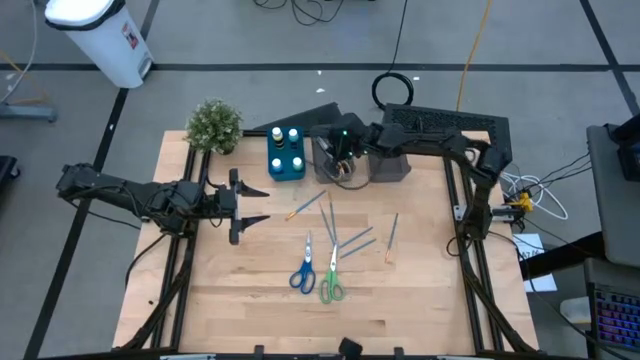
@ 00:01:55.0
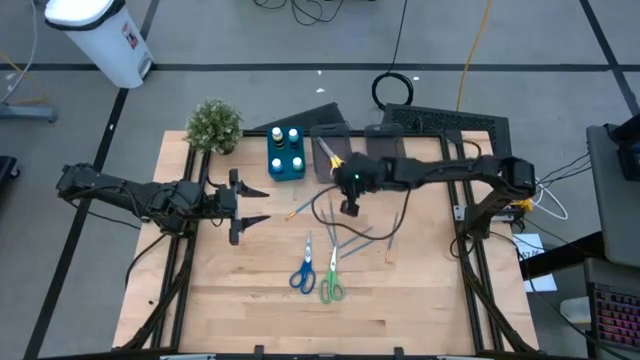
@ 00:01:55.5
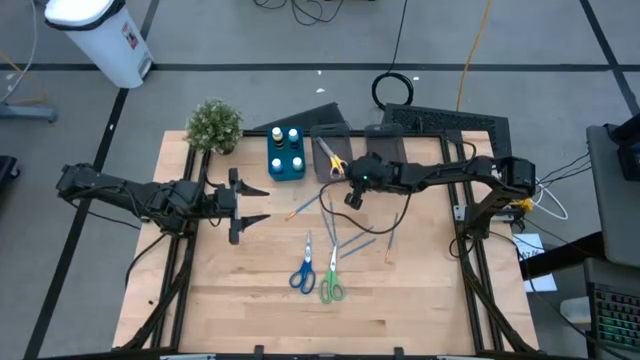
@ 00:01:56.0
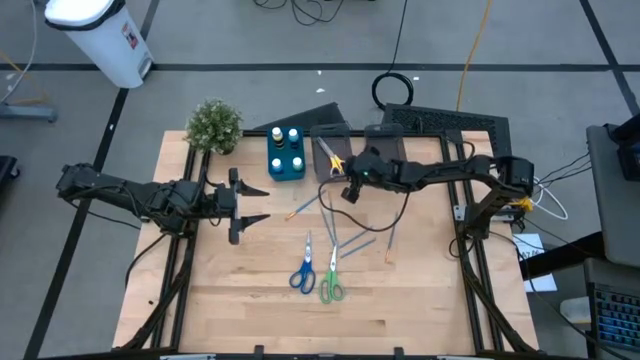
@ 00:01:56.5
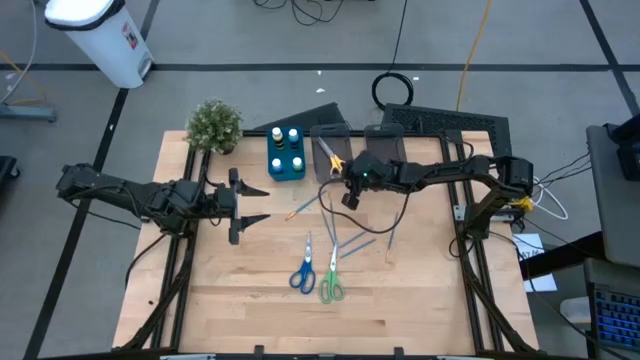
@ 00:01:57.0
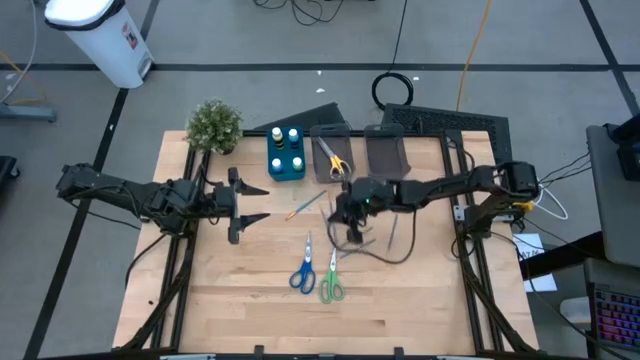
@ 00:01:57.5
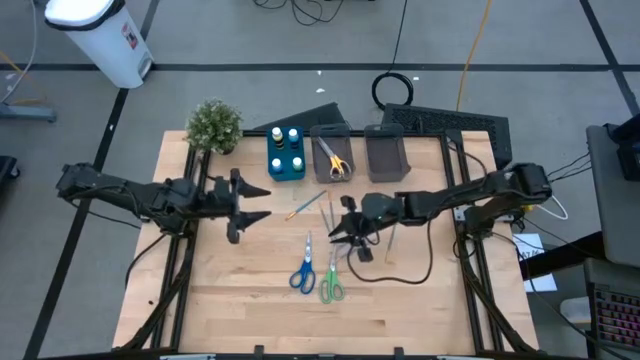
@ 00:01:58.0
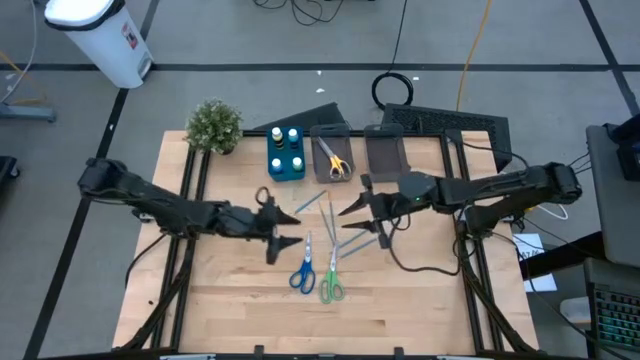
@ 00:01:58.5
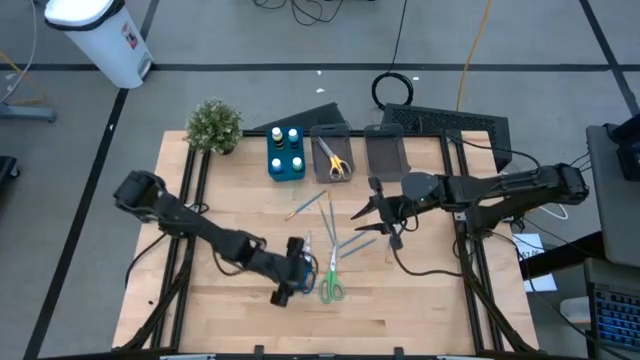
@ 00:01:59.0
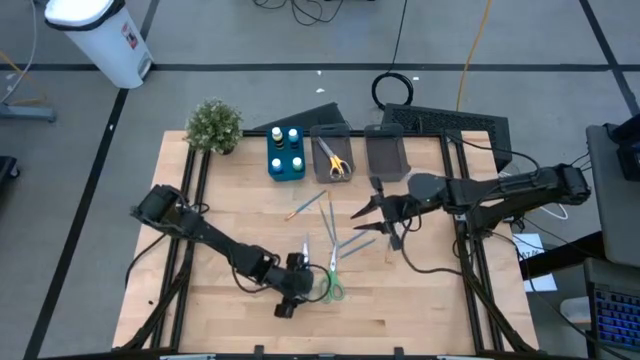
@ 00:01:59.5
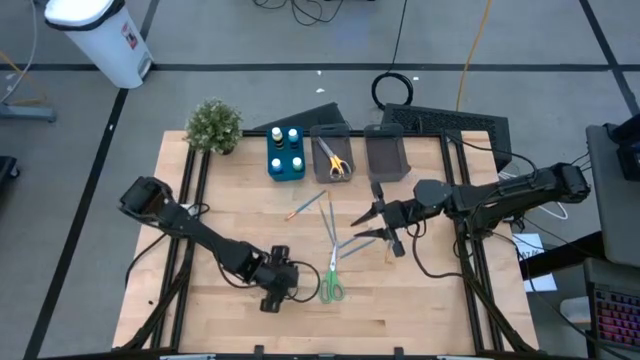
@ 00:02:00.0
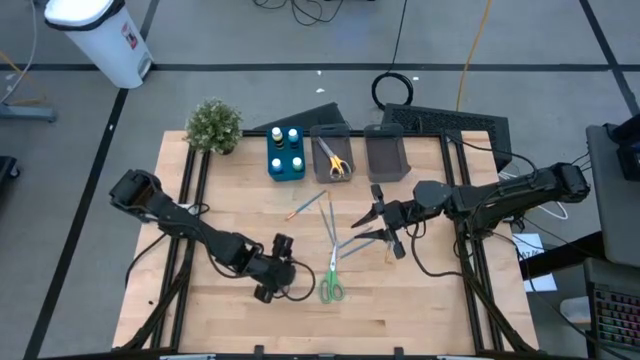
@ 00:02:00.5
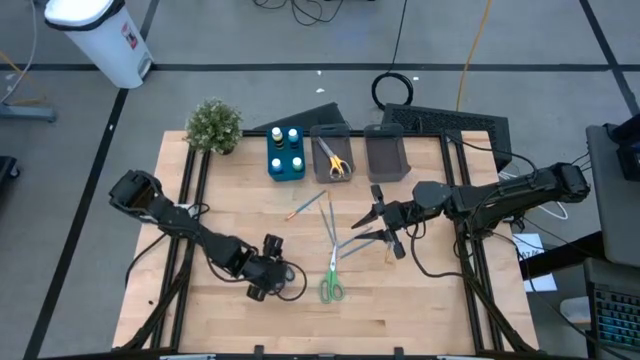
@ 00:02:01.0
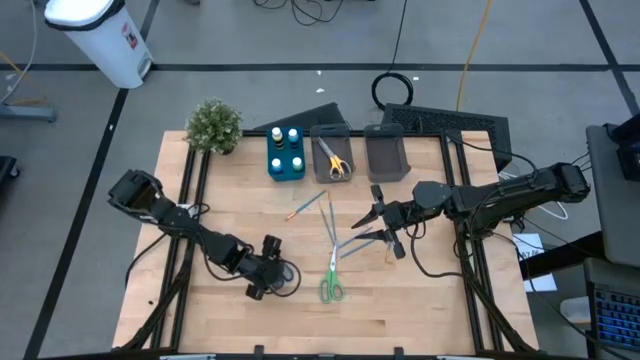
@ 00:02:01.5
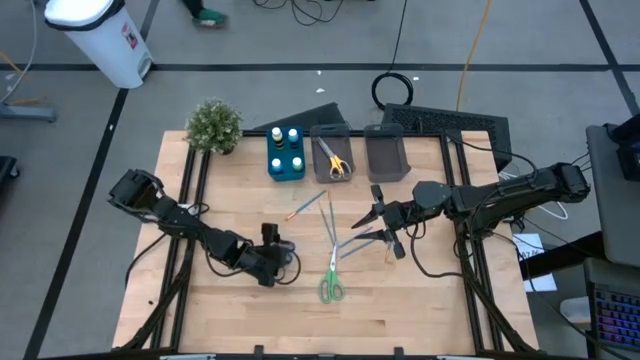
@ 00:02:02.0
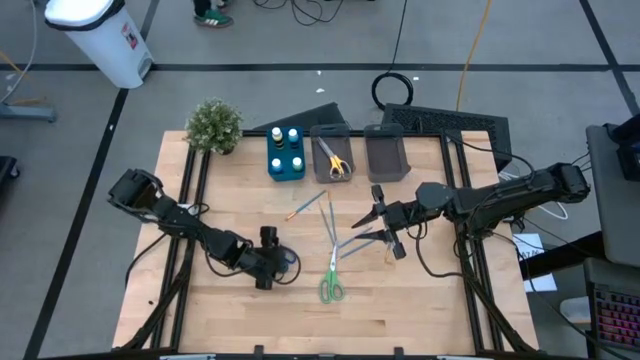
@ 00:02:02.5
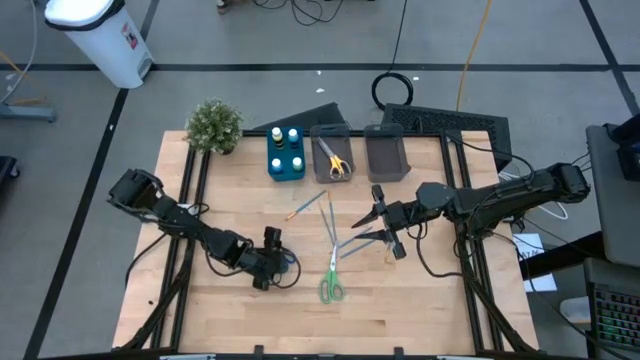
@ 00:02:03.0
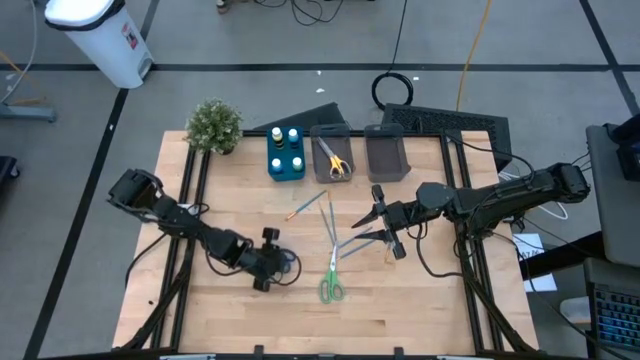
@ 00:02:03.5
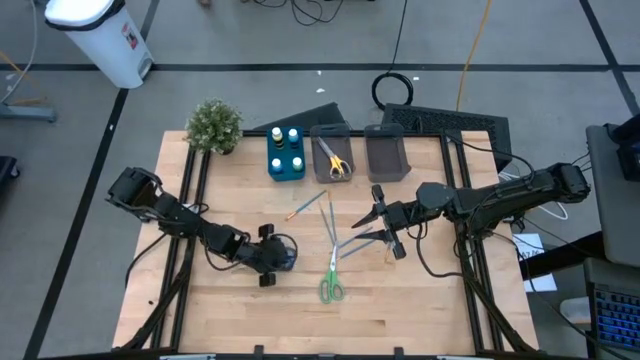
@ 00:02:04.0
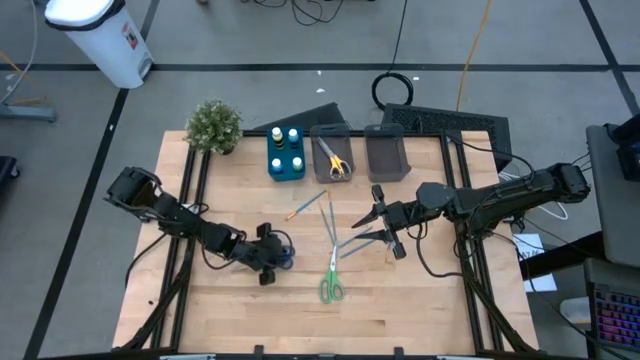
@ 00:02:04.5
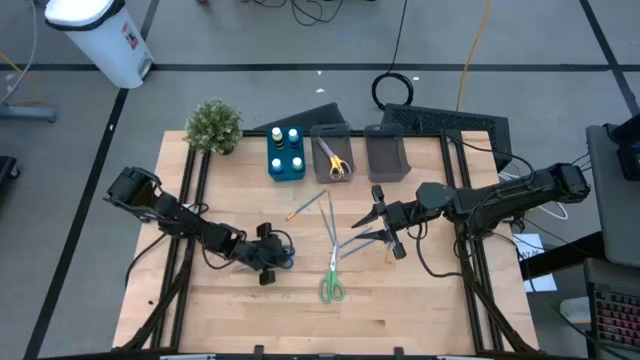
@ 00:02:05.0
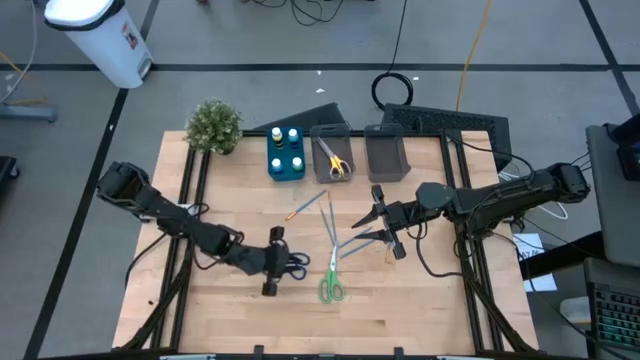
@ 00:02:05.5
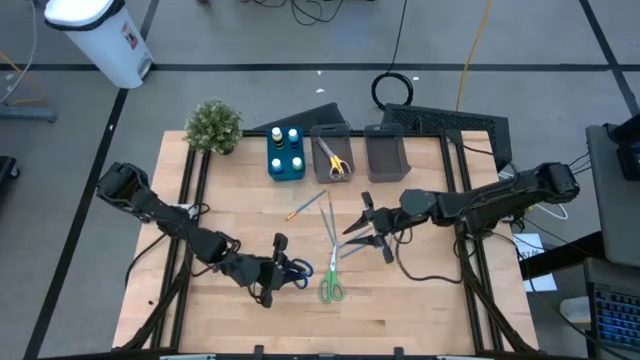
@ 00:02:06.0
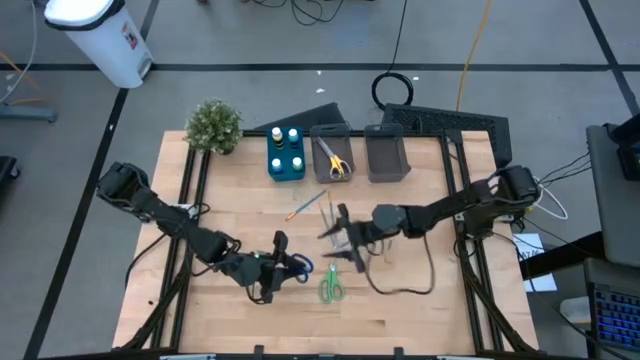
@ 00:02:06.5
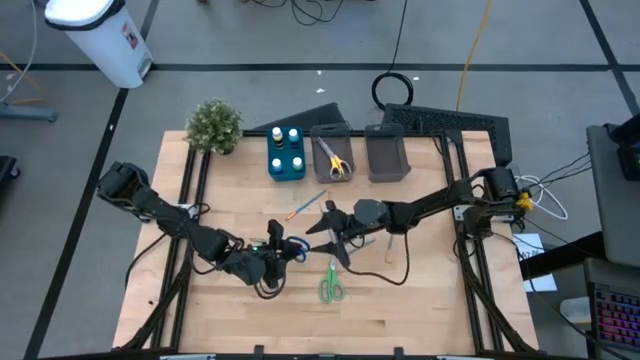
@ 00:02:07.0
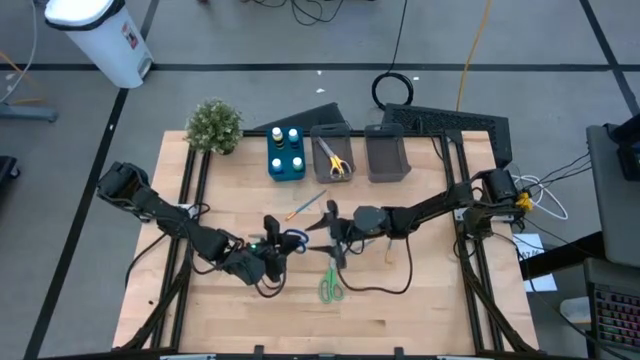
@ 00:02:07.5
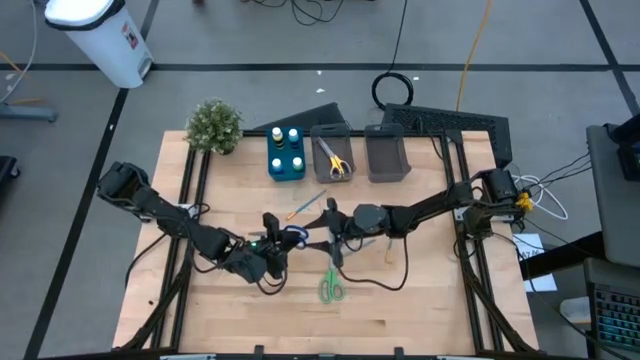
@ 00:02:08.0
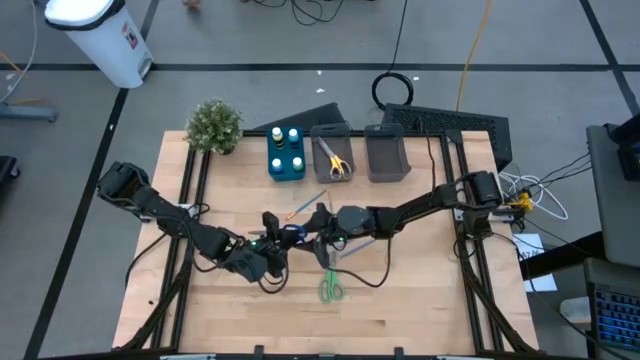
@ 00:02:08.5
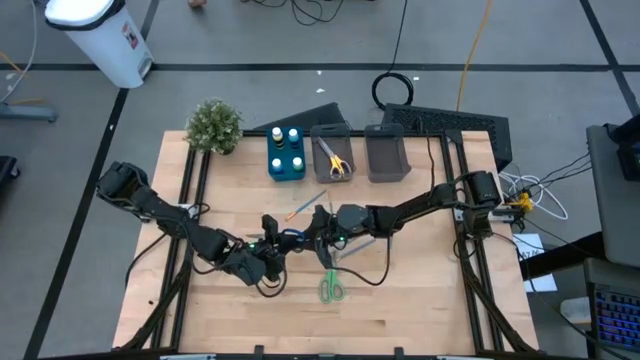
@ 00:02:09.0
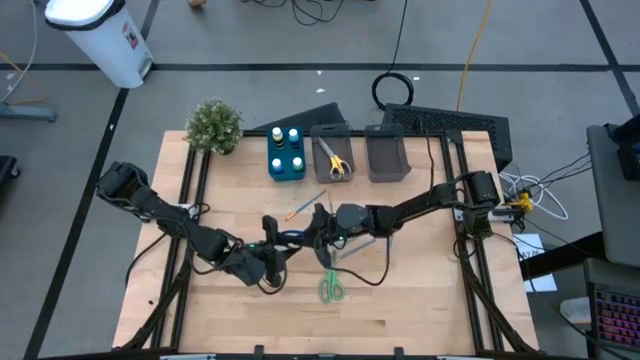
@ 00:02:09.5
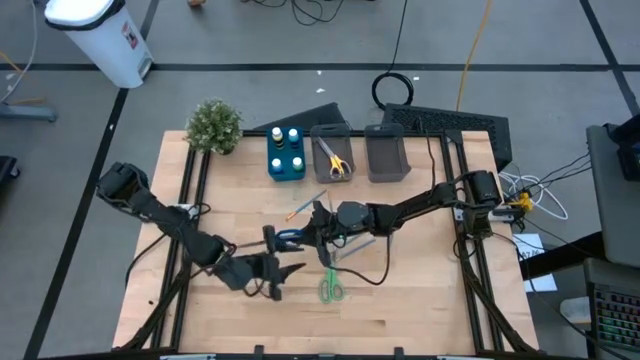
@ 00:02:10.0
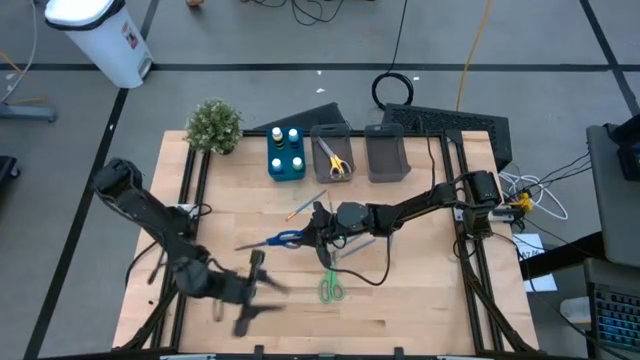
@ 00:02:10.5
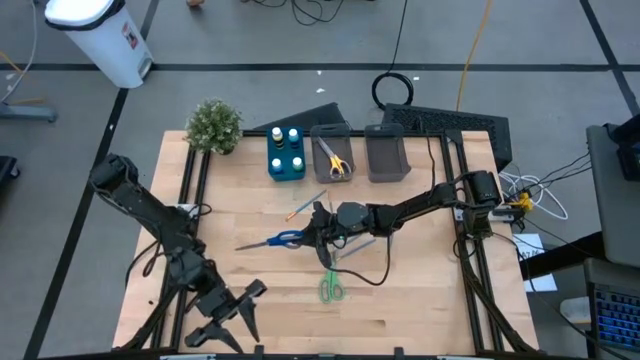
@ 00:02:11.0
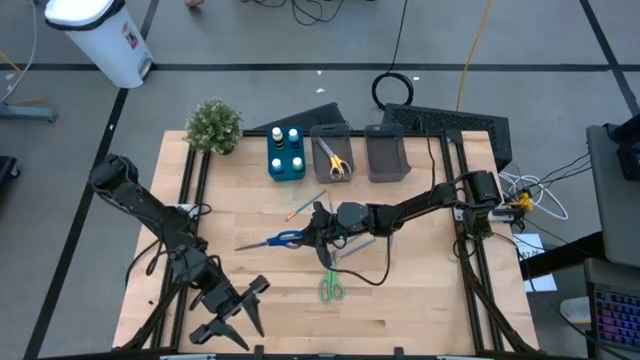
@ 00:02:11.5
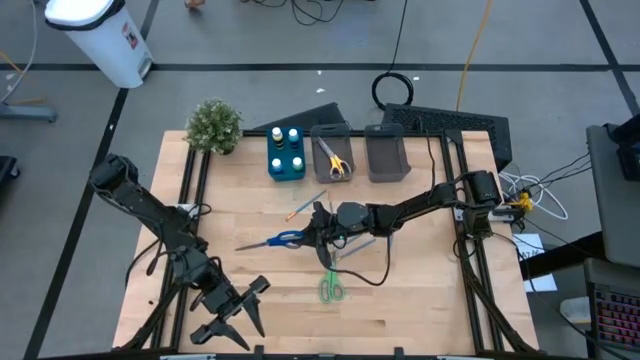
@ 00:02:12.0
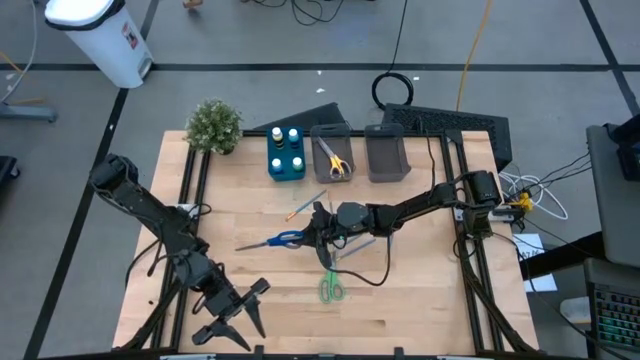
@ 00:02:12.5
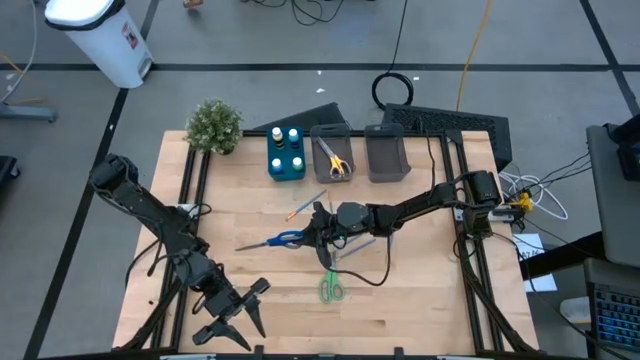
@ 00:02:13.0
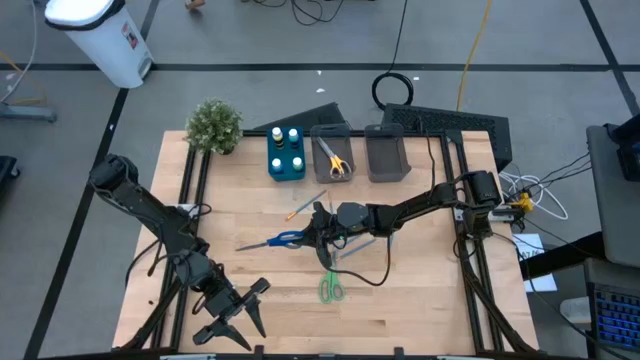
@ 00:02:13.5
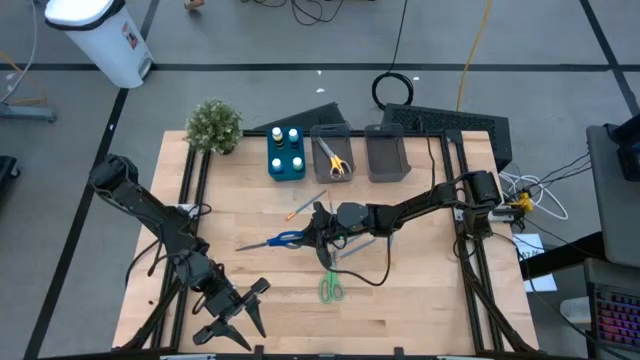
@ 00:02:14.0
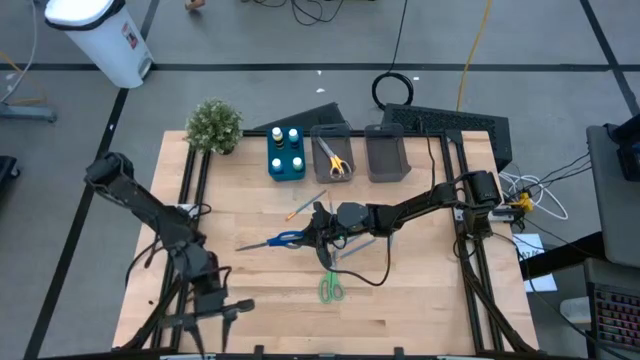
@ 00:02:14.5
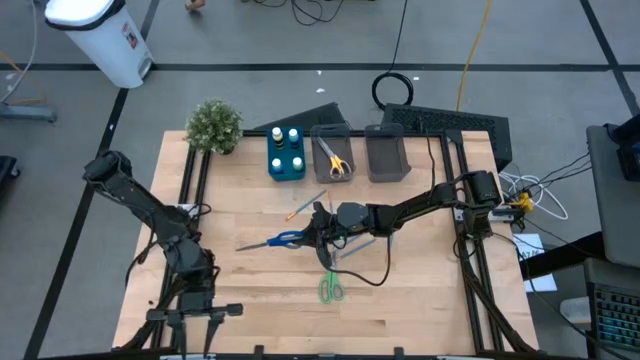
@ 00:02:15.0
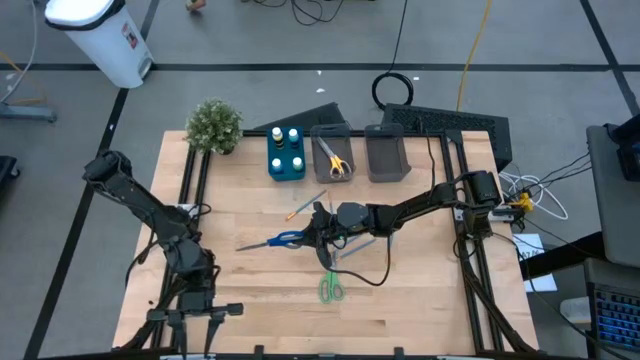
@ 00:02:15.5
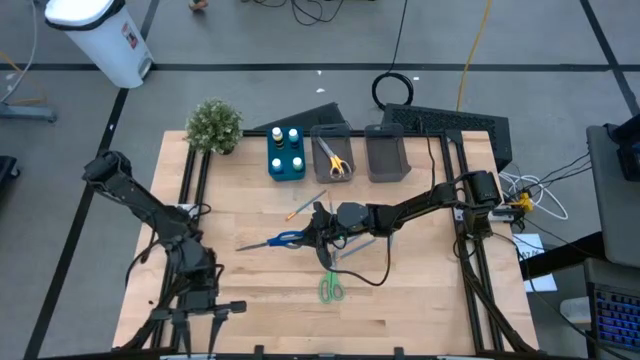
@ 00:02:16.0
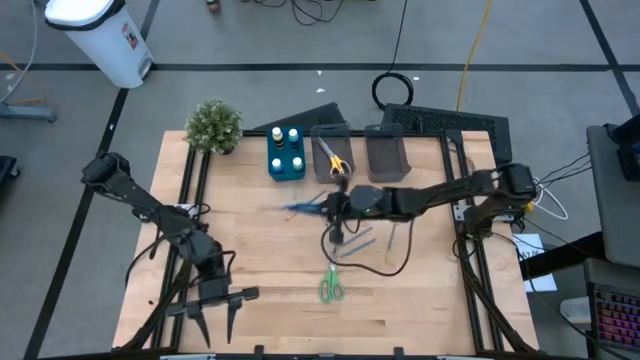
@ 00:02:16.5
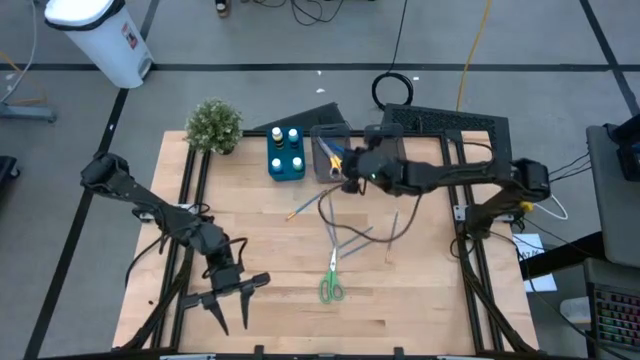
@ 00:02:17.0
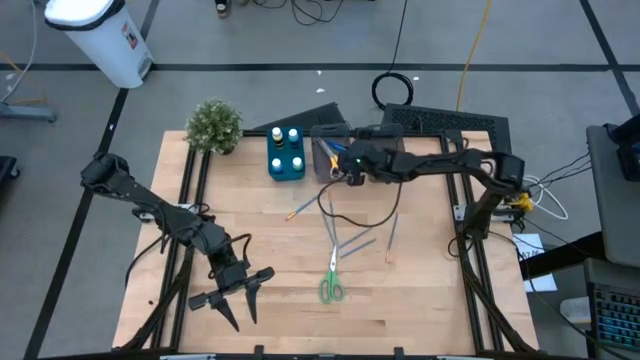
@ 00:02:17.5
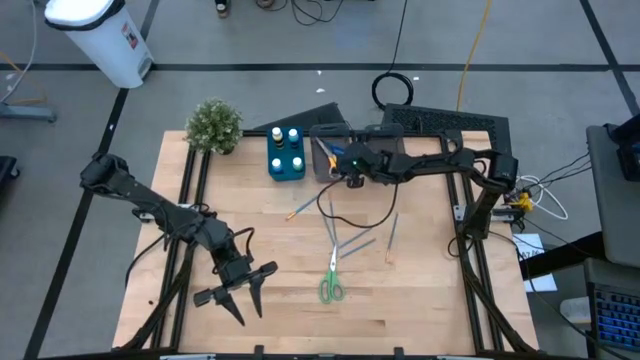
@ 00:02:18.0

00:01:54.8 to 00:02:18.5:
Task: Pick & Place Paint Supplies
Put the blue scissors into the left black bin
